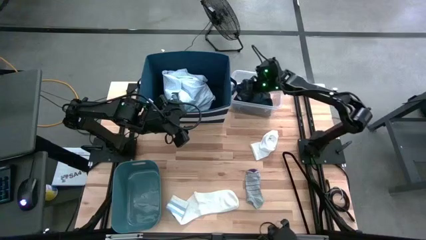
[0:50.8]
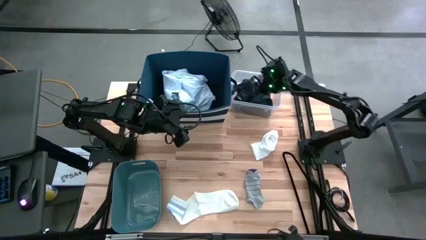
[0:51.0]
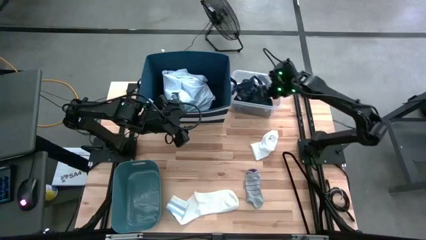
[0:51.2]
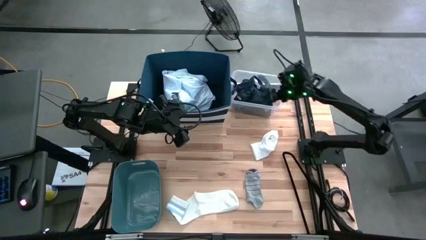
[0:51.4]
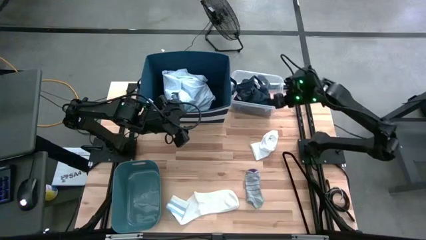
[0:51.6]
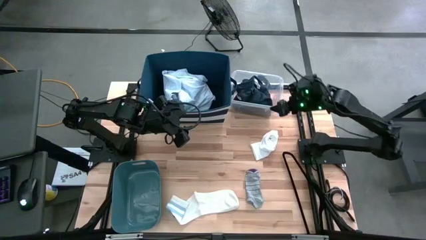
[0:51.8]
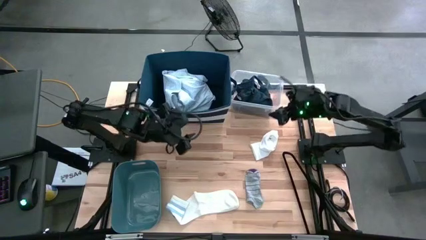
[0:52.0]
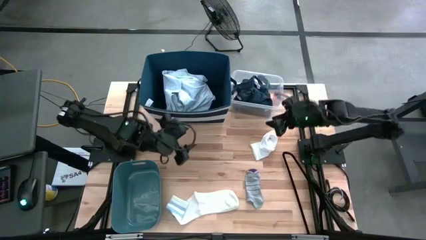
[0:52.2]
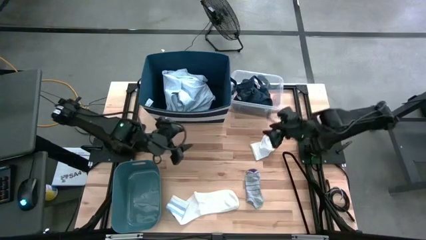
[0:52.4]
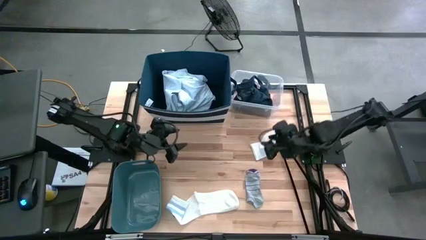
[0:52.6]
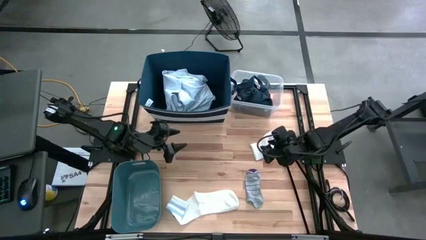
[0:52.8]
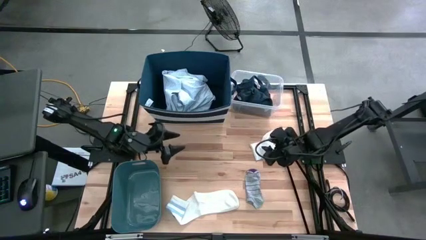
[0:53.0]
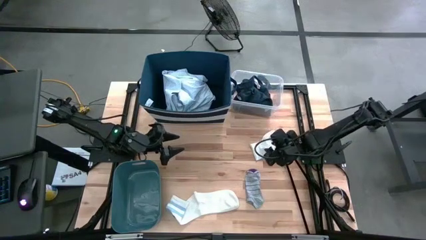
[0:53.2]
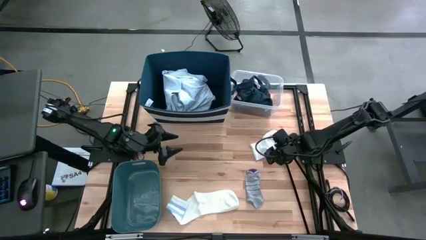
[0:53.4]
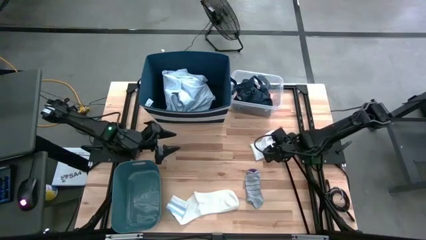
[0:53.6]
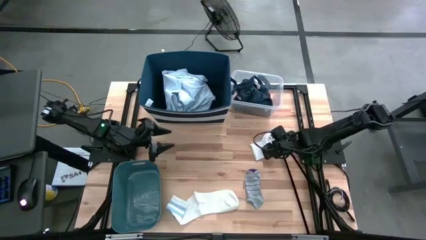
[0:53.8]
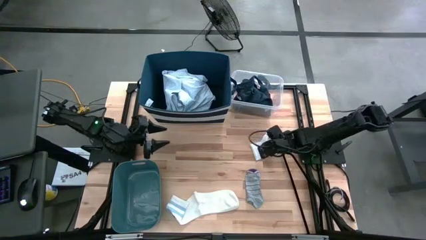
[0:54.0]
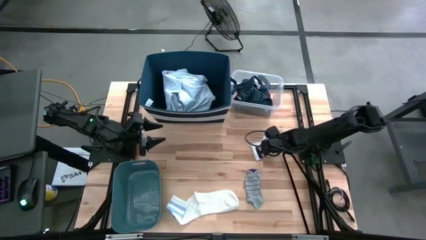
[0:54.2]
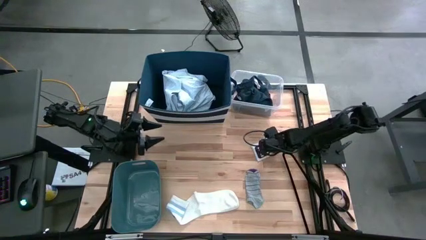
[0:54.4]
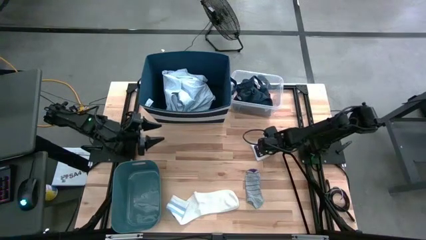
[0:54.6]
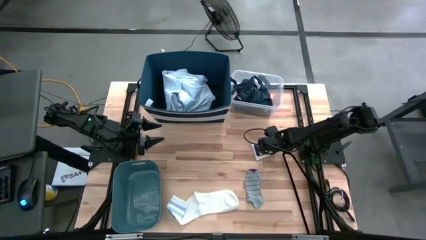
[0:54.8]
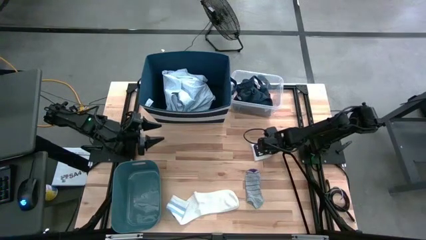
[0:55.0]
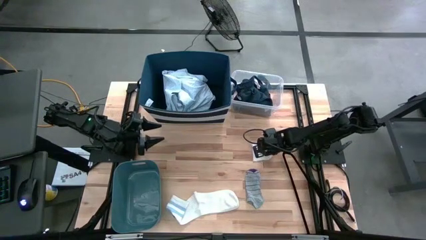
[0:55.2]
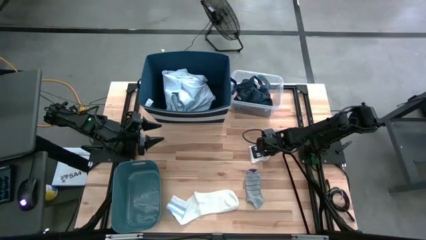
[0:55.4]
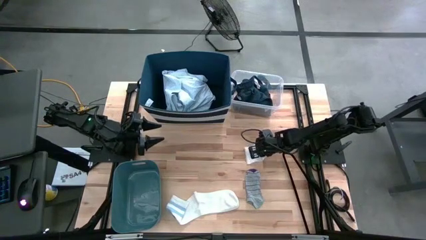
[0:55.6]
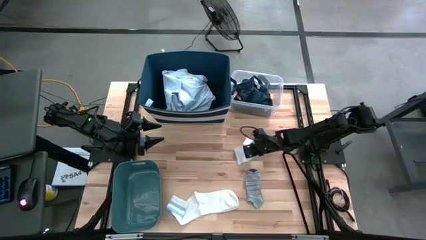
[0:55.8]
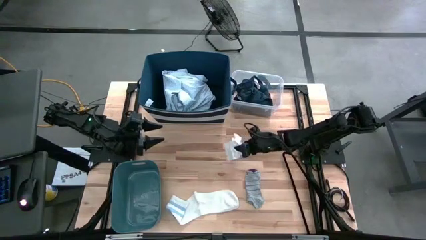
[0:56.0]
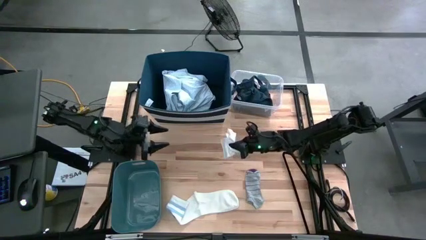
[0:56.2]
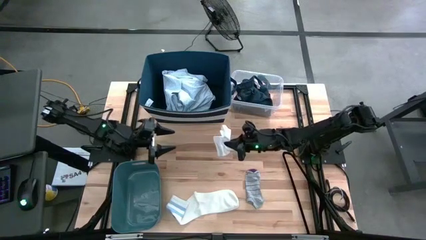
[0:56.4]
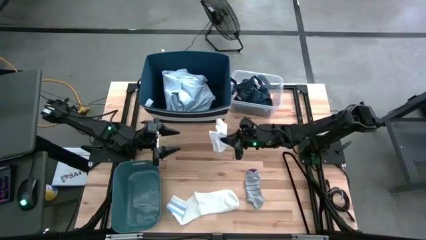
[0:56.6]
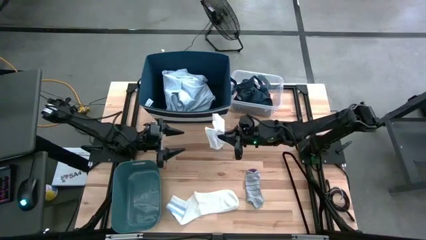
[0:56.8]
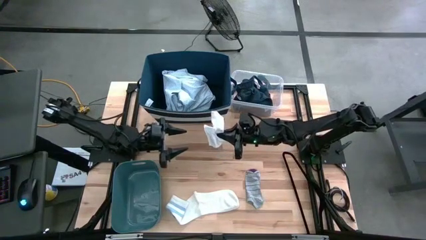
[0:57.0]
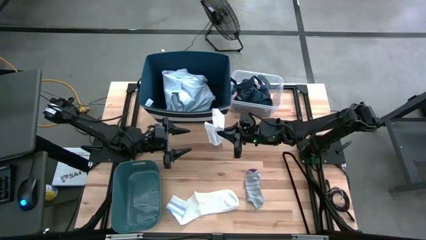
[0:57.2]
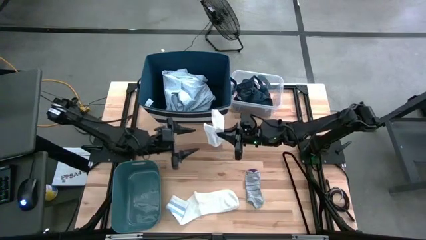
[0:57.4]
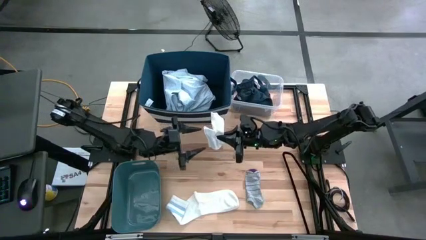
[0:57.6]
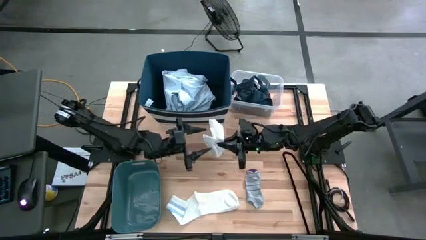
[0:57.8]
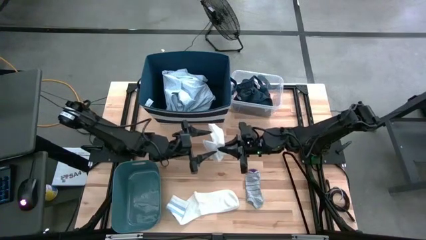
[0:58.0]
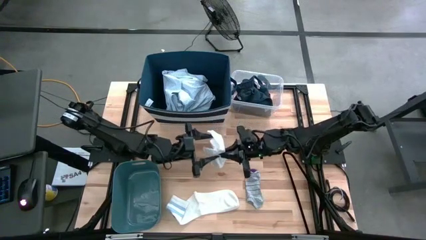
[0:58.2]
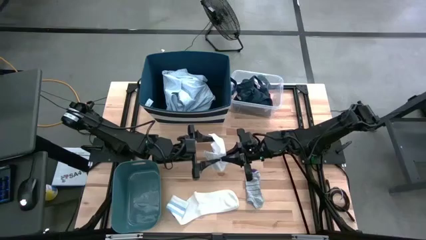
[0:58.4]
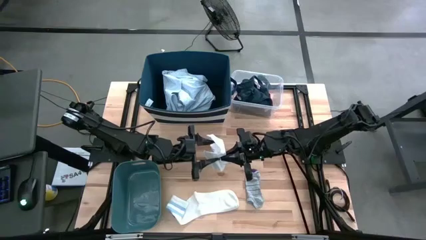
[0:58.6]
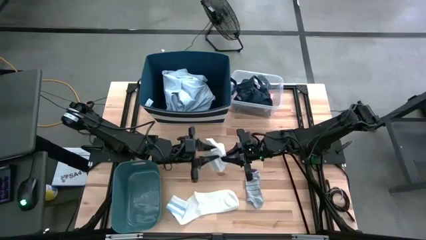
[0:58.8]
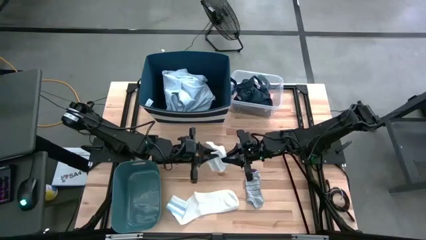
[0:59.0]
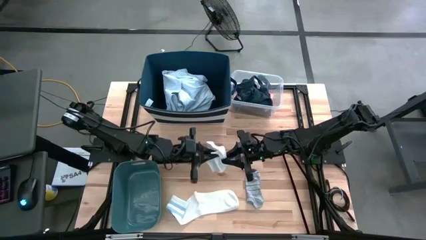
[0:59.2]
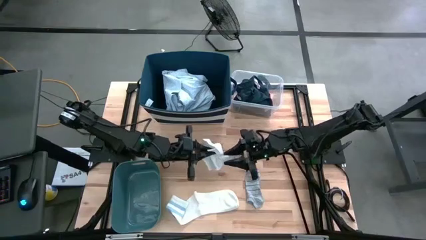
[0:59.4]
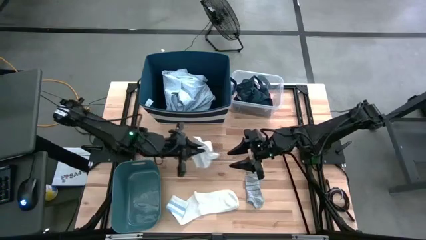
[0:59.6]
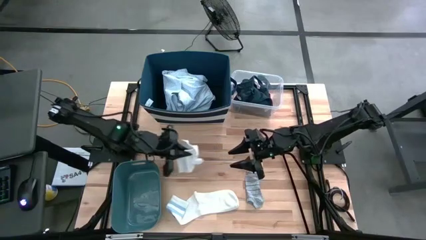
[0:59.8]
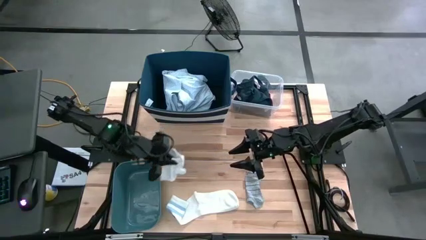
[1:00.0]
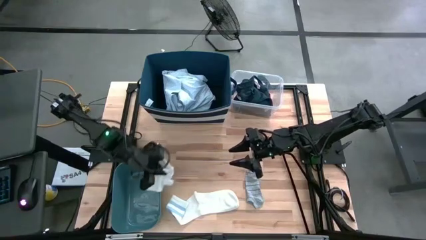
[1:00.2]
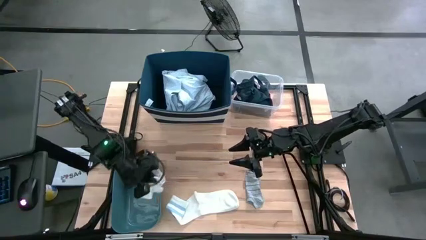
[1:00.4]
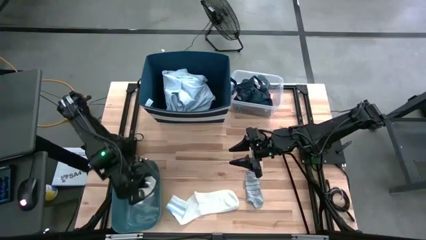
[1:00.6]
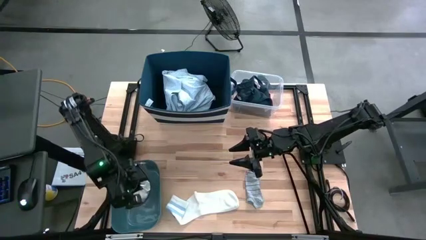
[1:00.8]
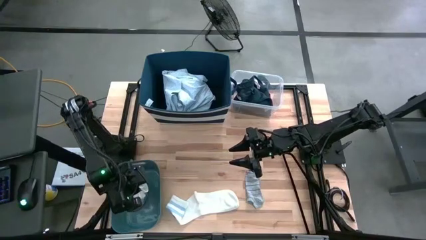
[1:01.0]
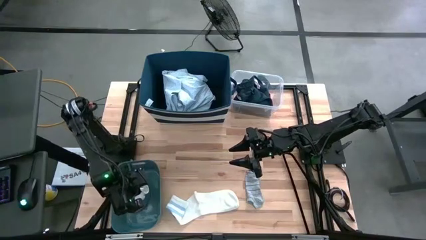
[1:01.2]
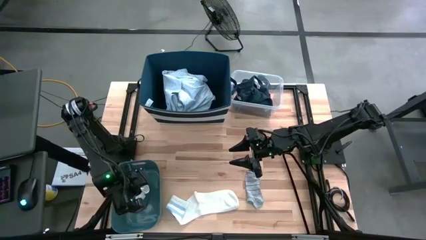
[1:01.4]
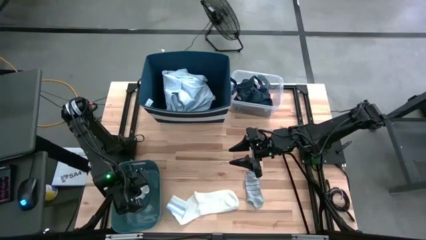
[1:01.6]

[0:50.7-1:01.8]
Task: Pick & Place Cloths
Put the top white sock into the light blue bin

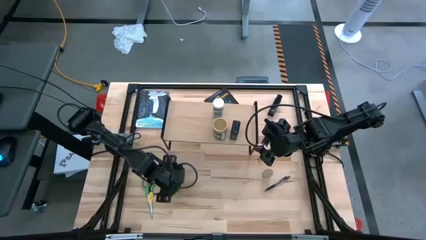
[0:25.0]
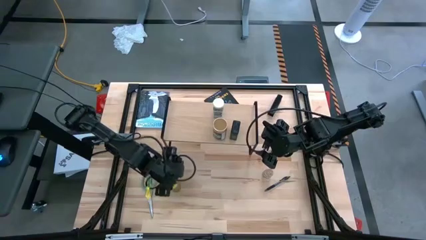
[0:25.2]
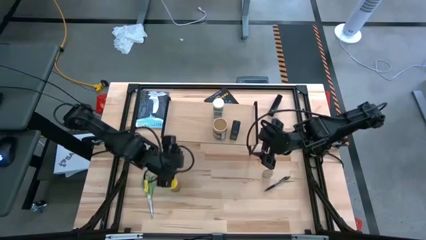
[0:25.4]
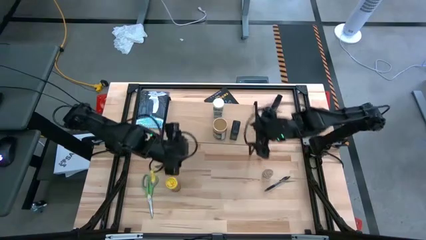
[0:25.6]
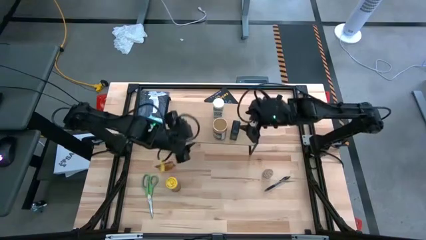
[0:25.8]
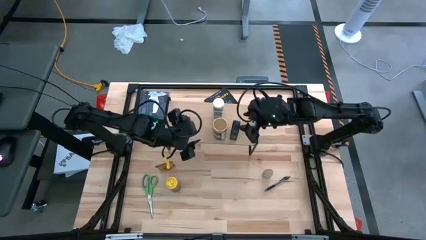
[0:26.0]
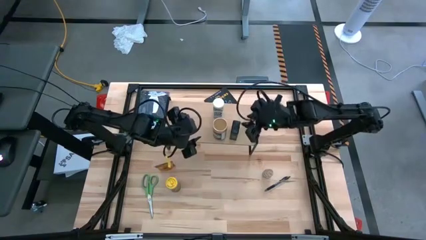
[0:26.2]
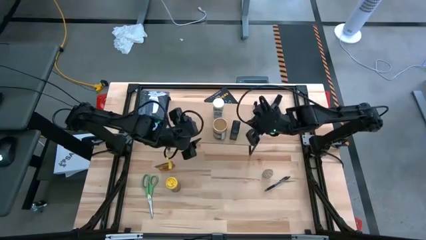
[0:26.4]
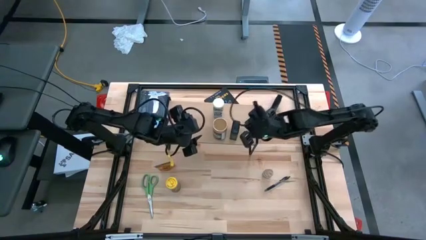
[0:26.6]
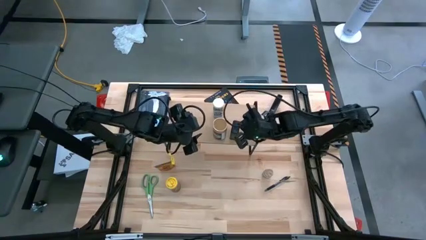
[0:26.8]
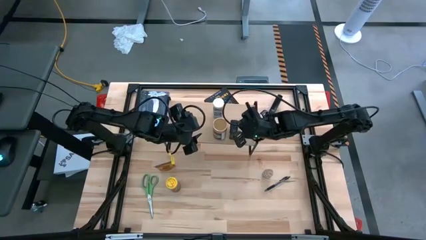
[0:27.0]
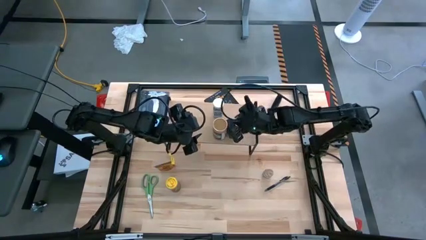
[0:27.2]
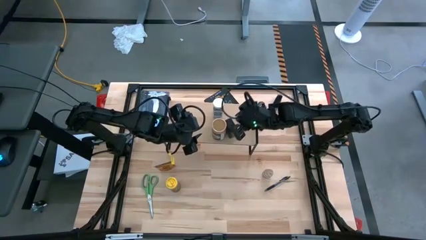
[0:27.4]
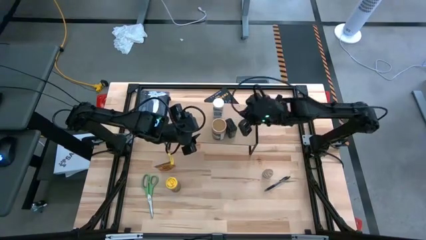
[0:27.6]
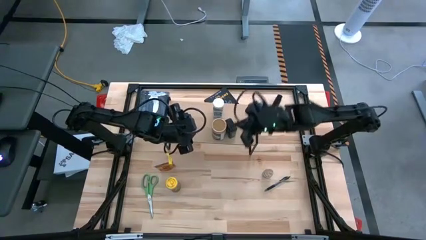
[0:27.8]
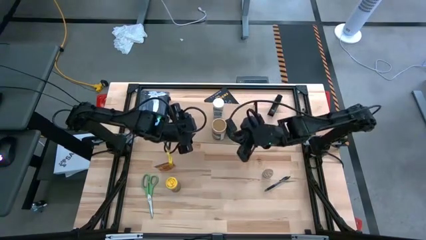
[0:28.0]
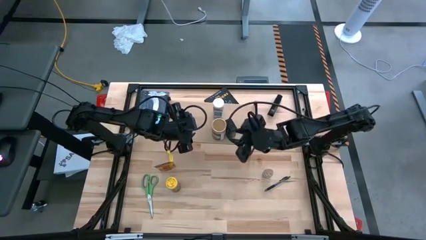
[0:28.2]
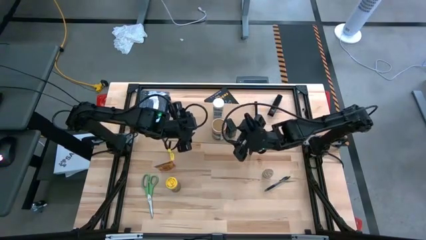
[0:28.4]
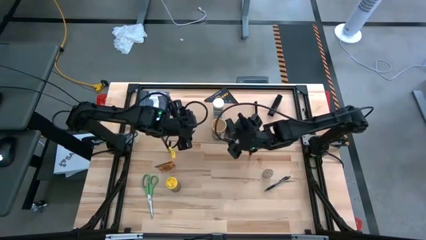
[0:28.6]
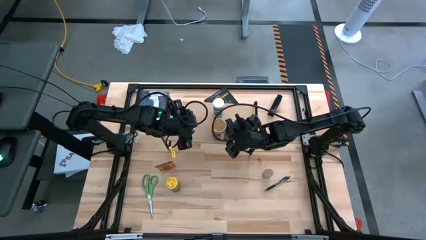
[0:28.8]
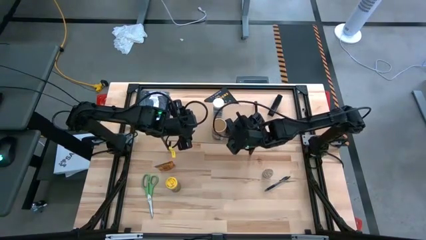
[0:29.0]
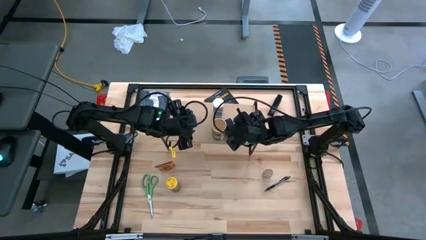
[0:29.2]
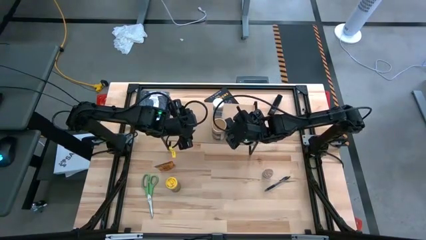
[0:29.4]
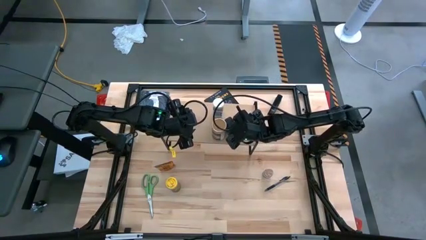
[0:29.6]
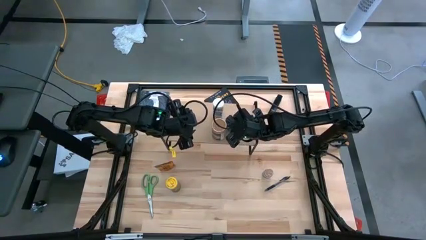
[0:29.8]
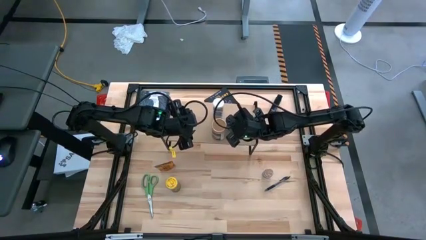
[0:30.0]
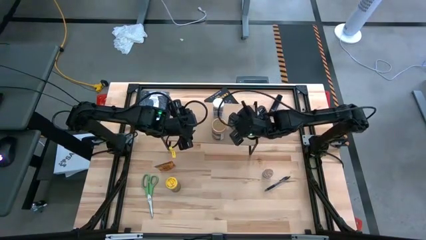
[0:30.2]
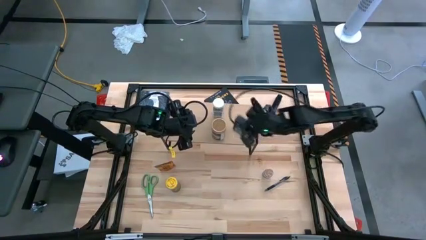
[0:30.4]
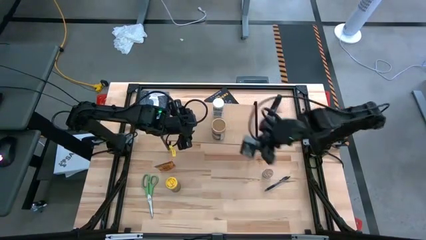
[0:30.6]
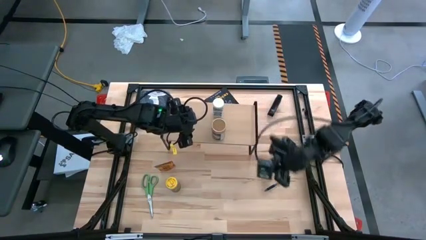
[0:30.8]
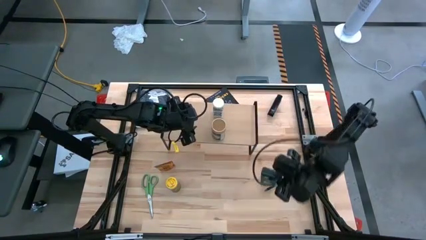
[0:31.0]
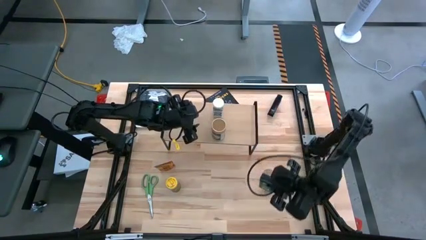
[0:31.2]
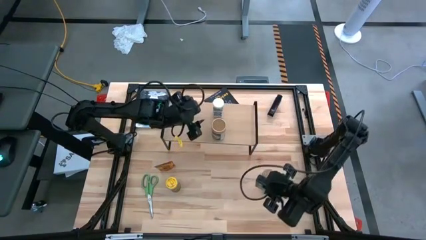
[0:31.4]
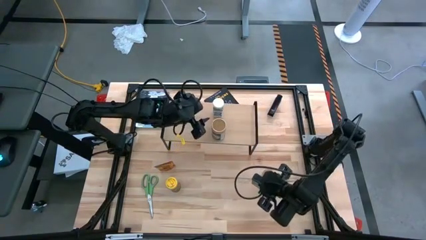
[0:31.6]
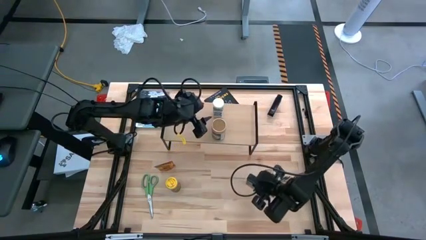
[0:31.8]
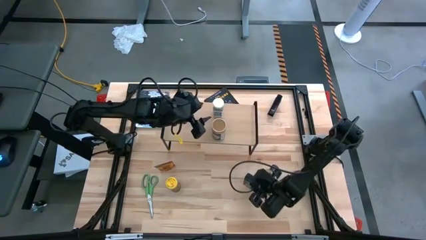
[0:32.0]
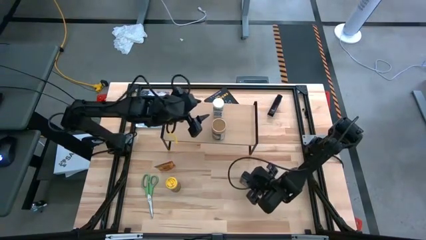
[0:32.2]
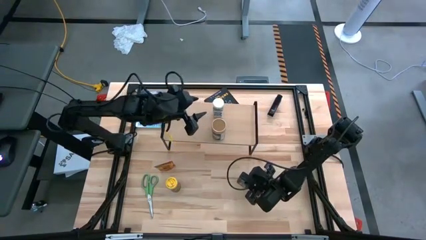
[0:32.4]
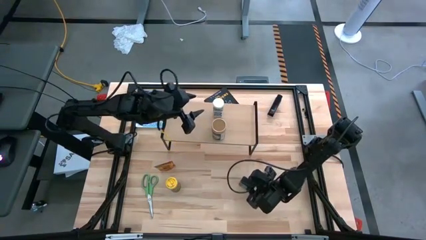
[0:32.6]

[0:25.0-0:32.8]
Task: Shelf spices
Remove the black seasoning can from the shelf
